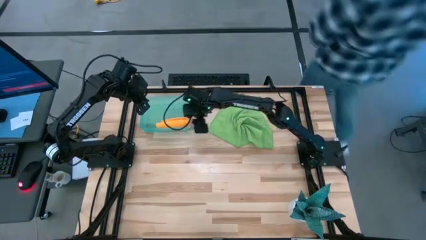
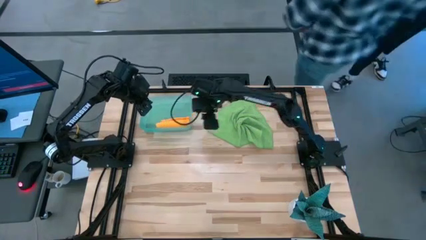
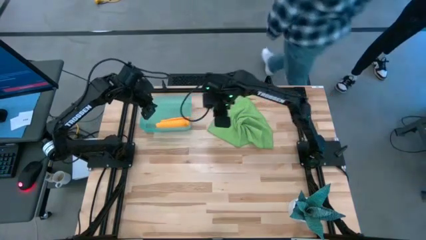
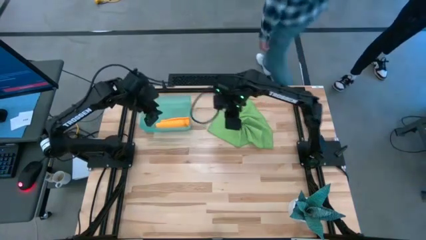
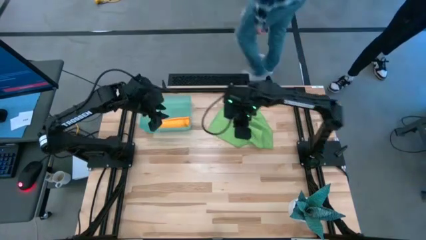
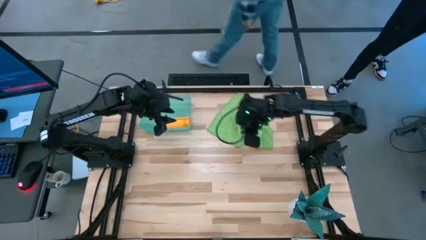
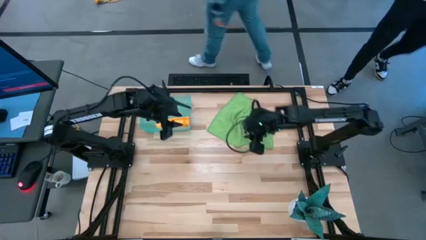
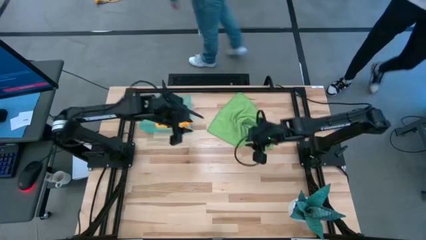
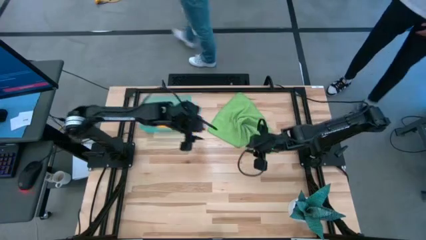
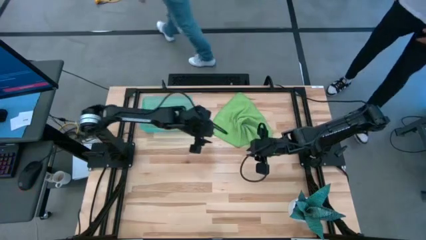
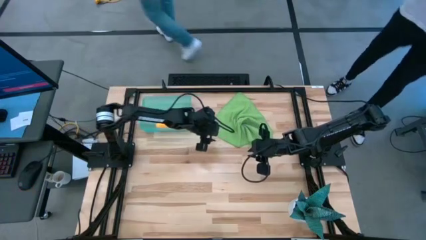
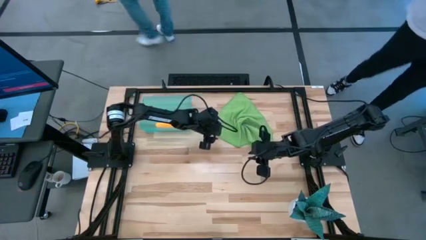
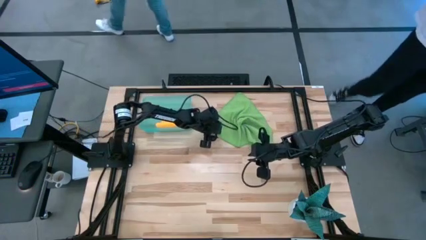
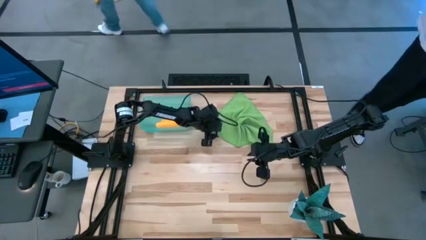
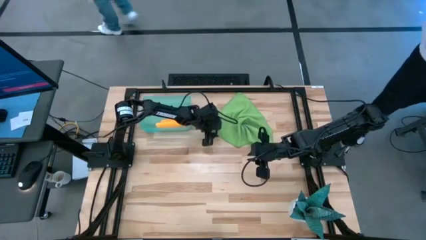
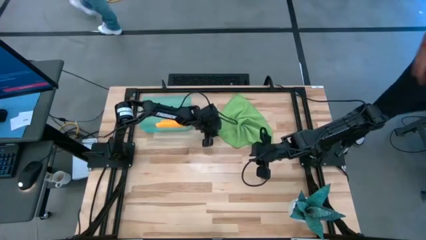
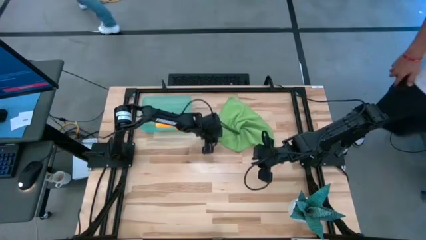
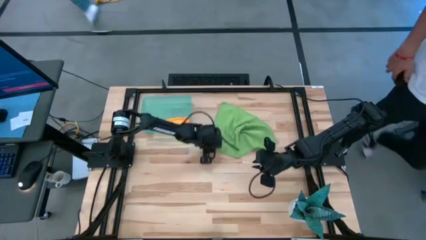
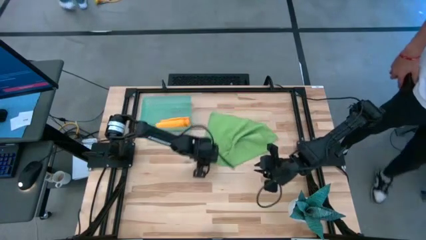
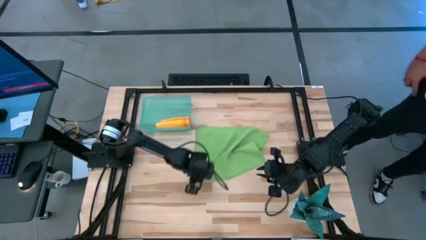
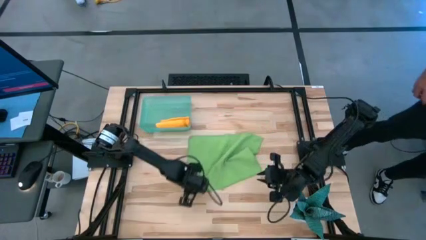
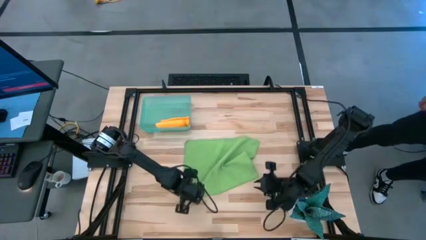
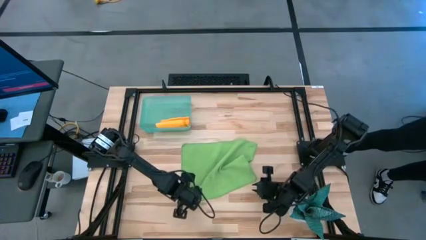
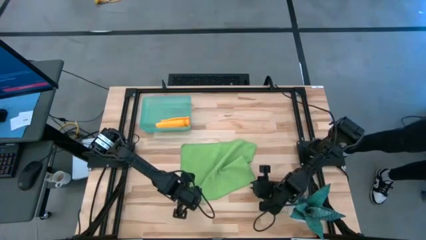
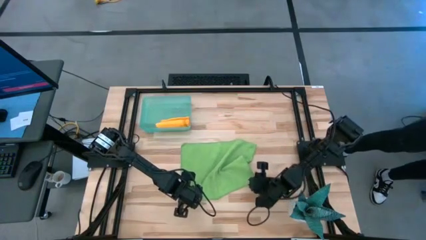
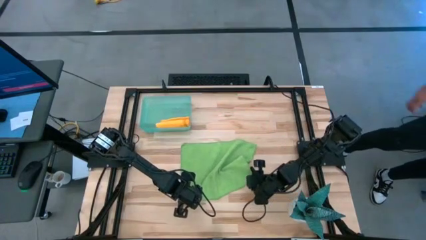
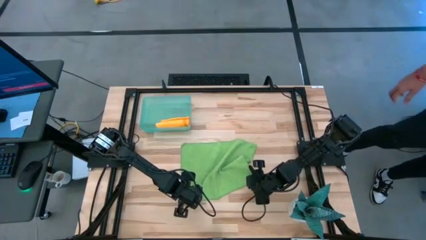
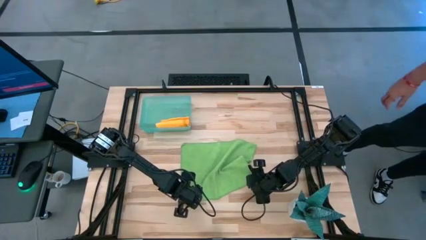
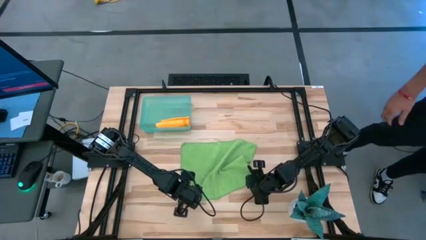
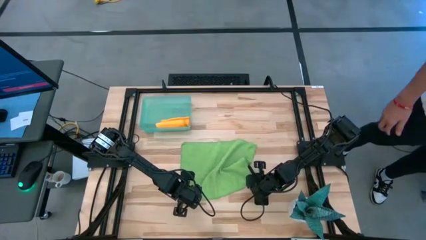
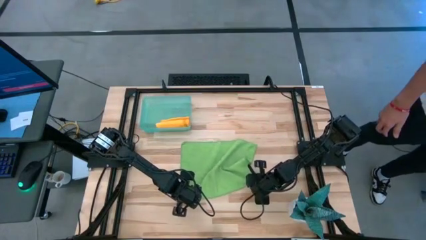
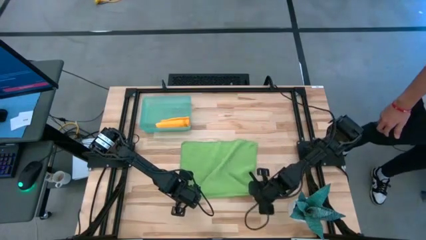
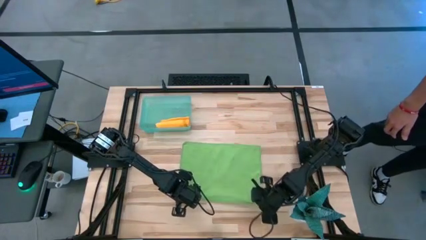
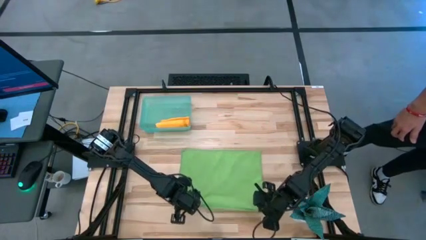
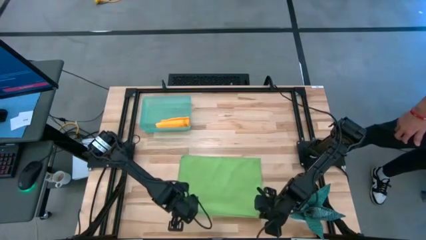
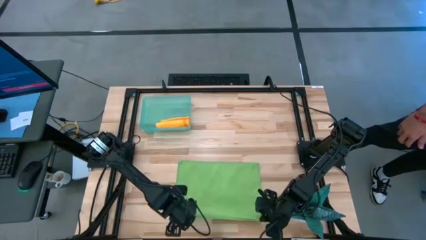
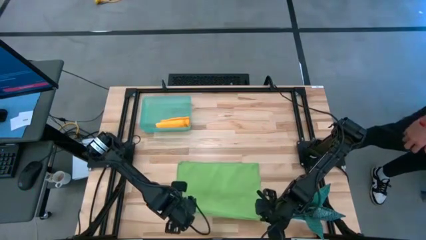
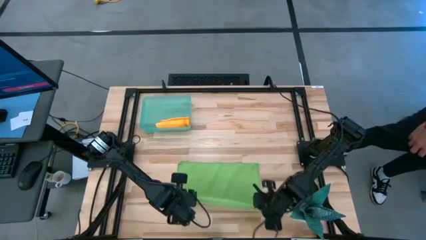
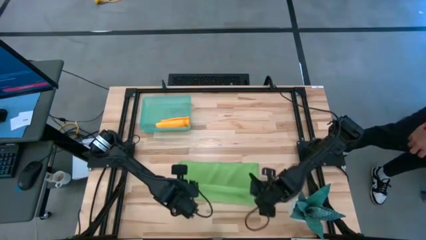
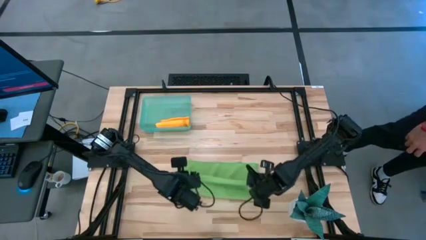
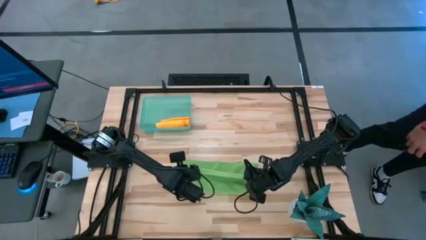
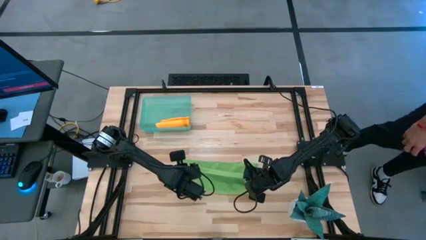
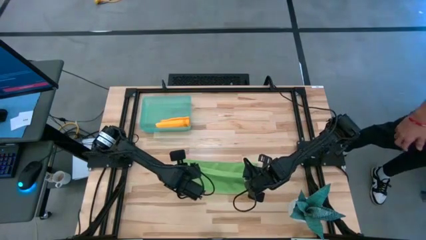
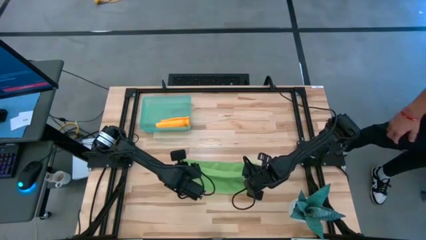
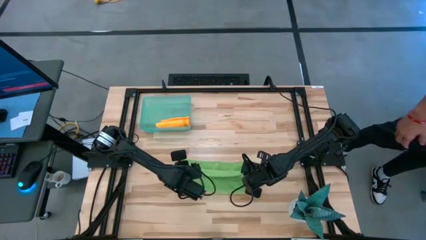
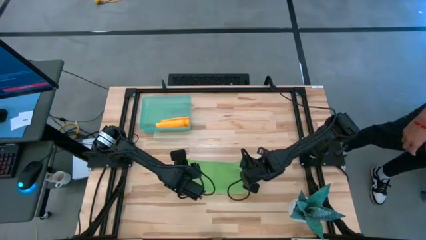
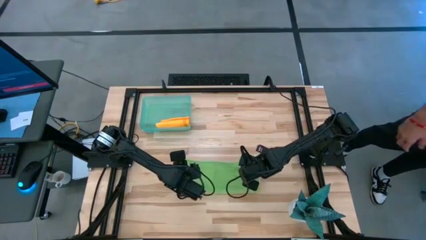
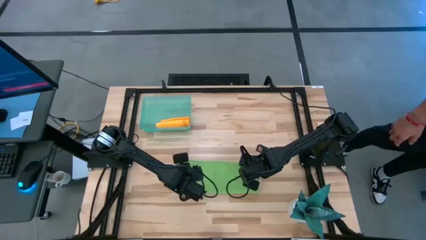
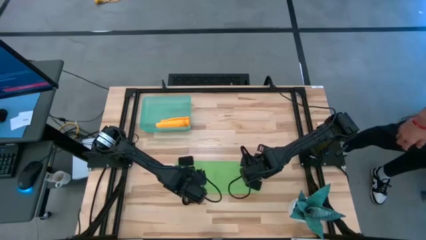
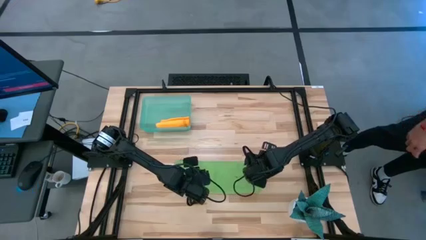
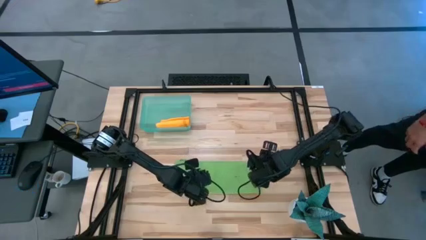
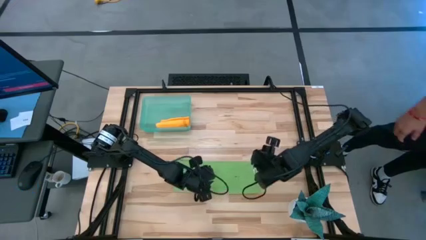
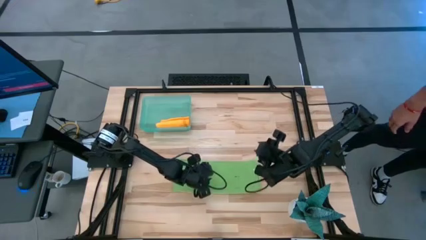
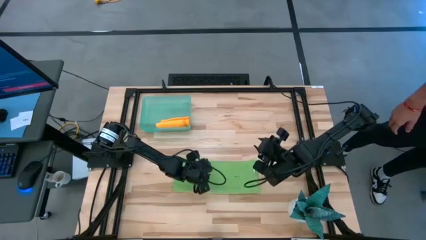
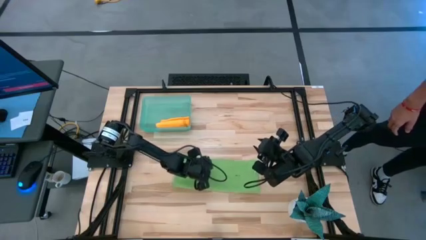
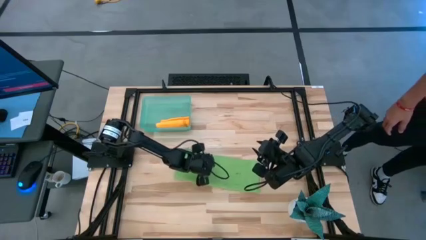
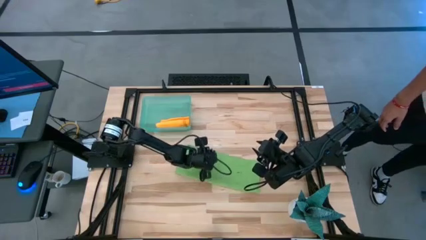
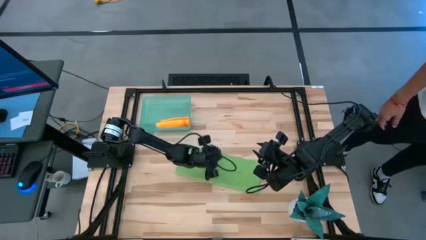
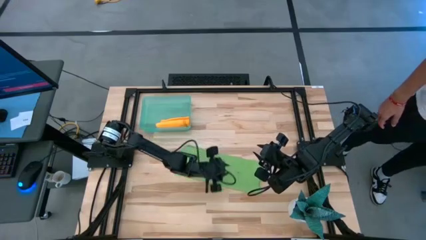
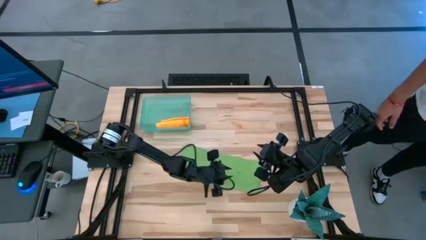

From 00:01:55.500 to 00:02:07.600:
Task: Roll microfiber towels into tight, uniform cylinder then place into a basket
Fold the green towel

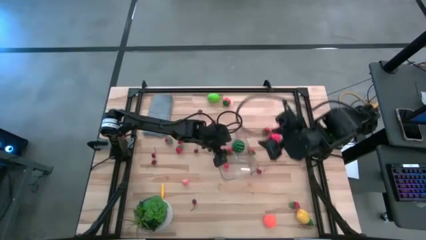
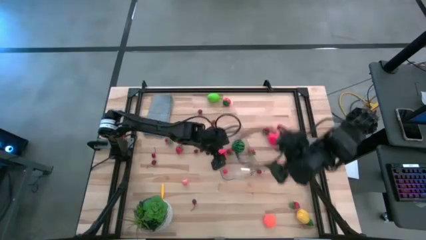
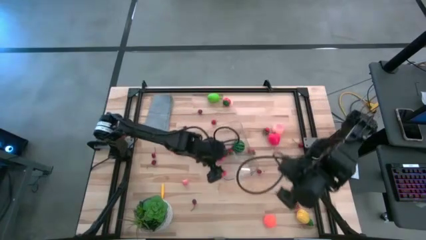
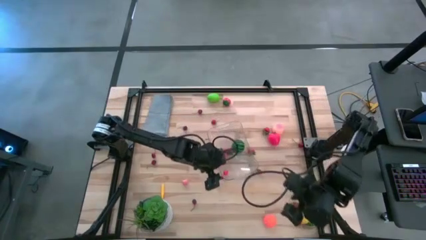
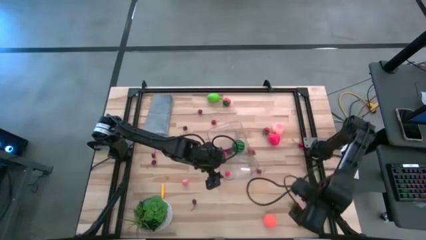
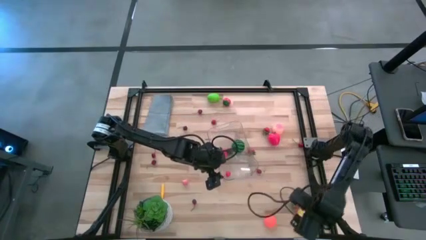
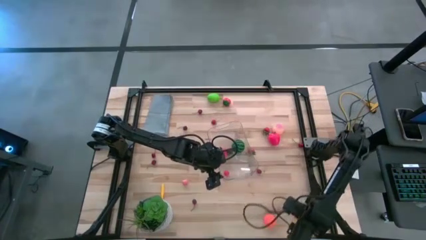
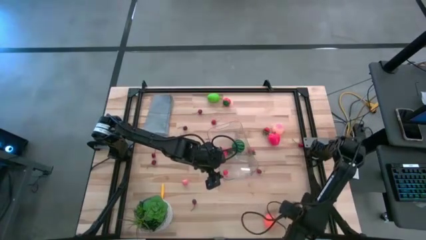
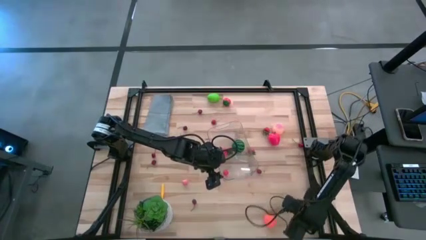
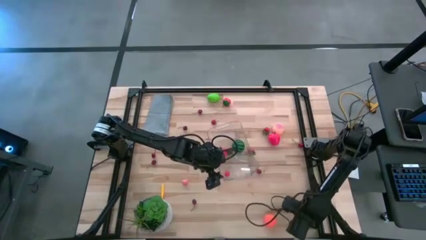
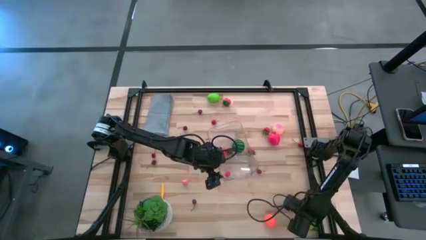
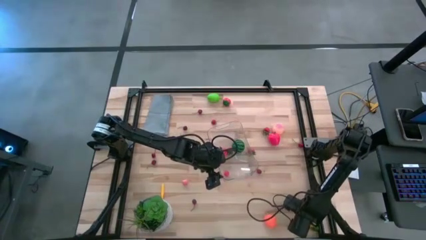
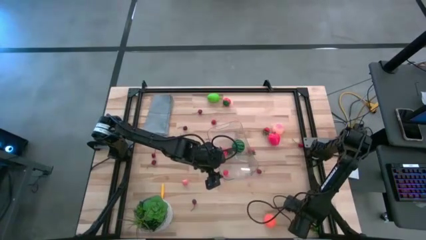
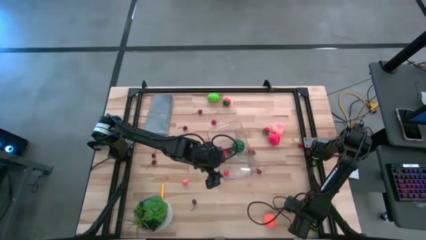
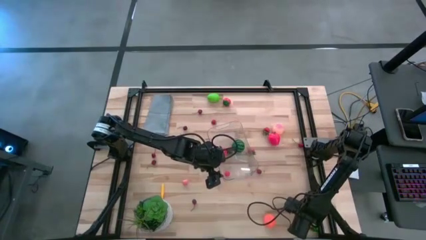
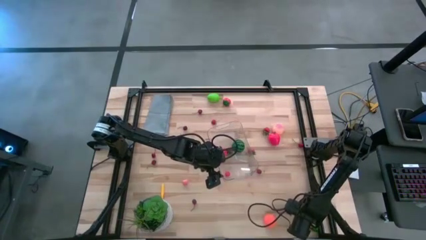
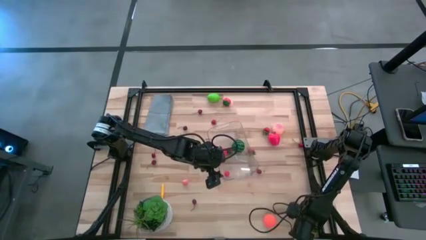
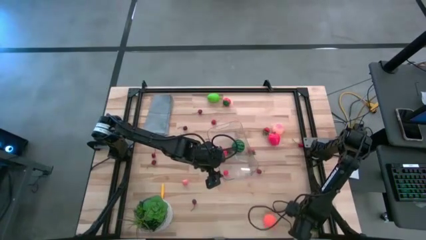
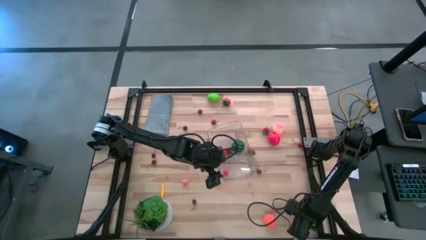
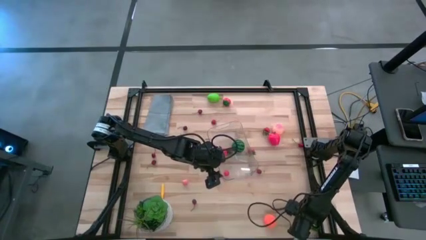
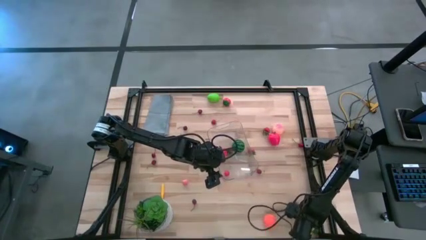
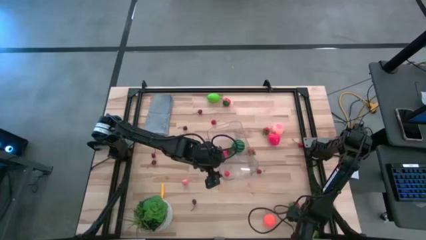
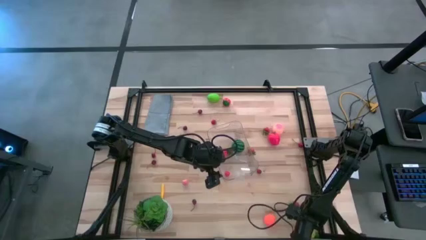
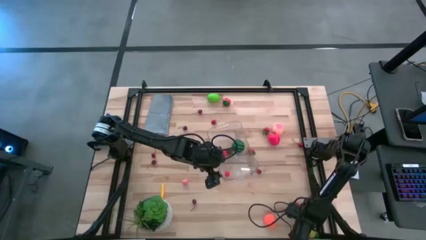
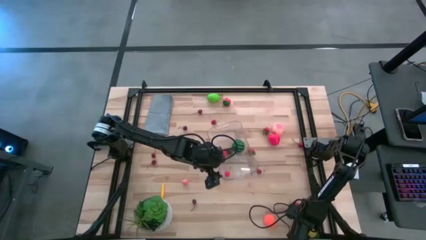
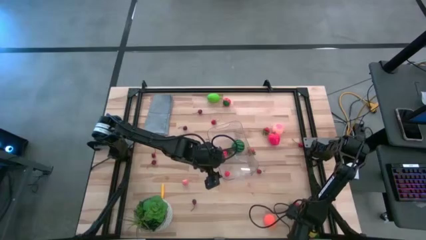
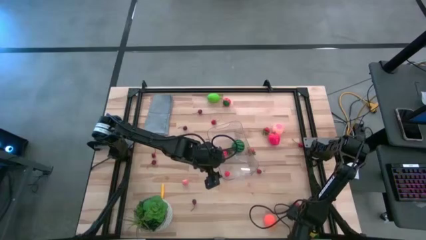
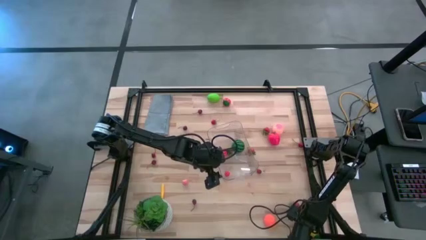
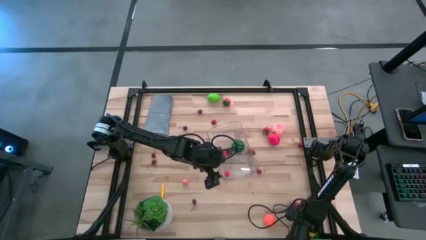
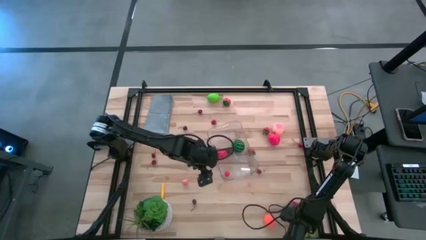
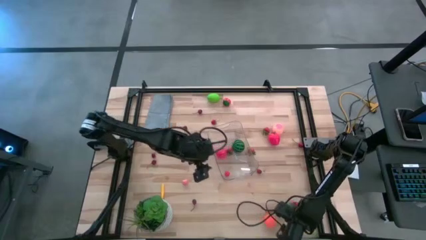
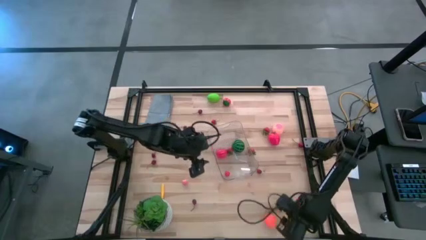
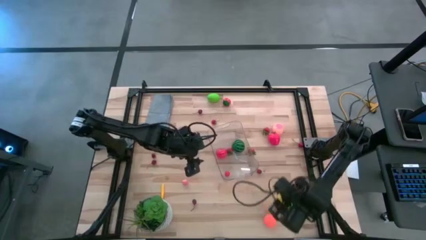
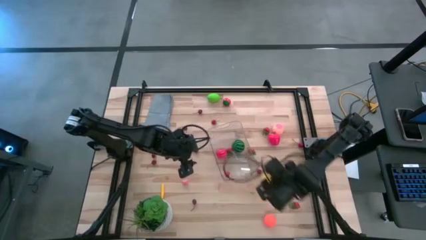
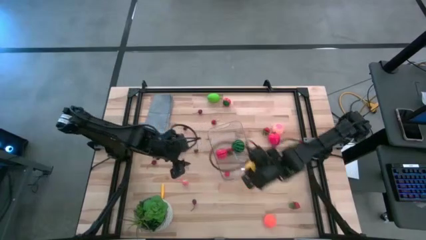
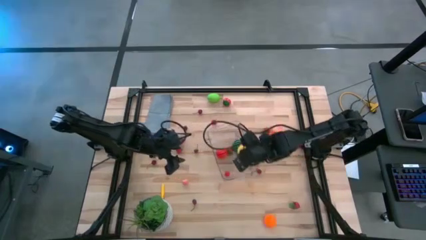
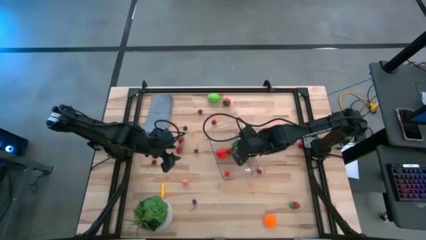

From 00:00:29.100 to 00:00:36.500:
Task: Pick and placing Produce into tupperware
Put the yellow pineapple into the transparent bin
